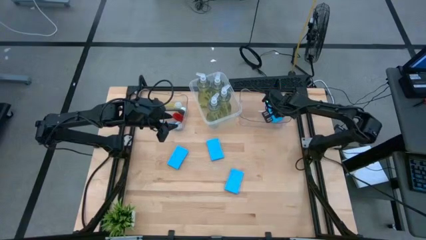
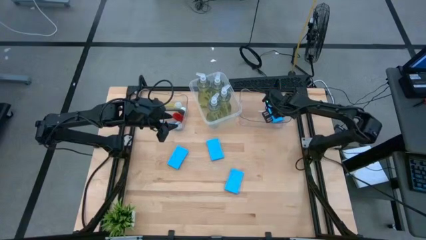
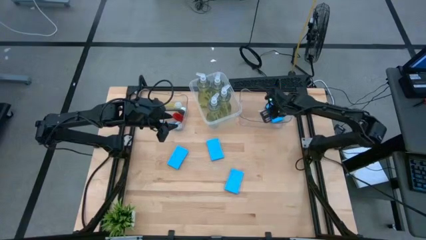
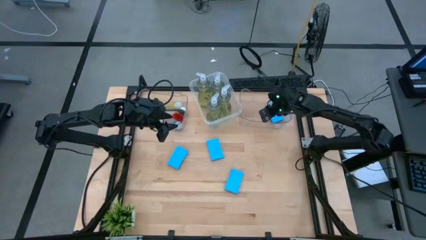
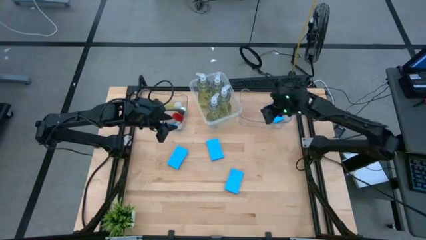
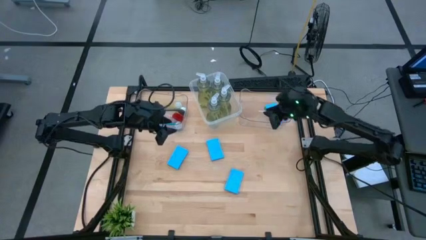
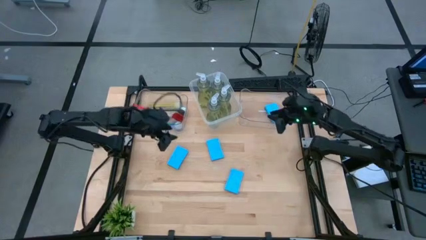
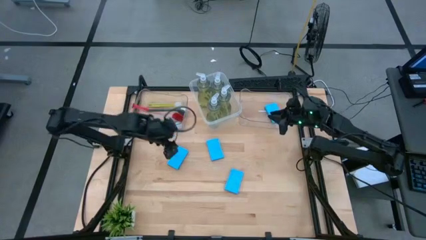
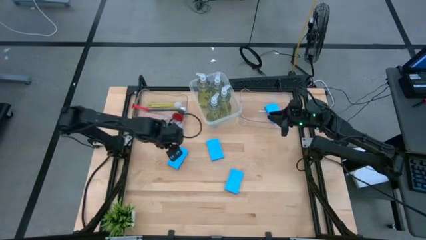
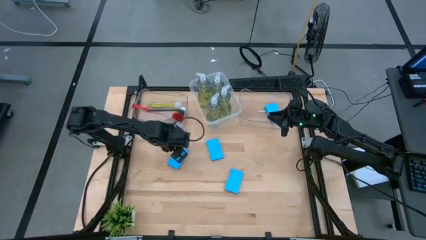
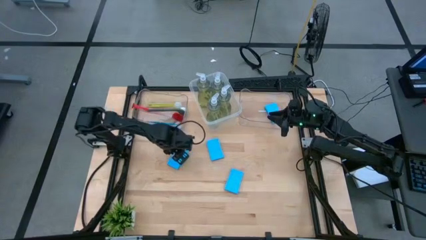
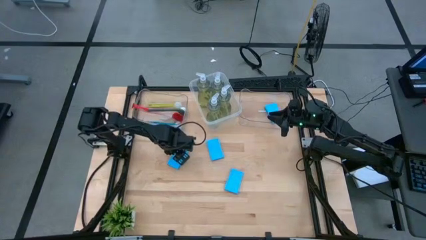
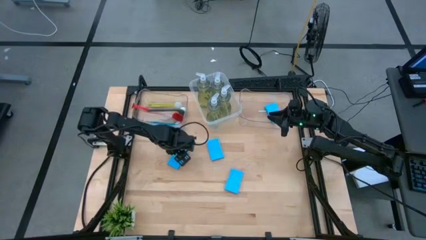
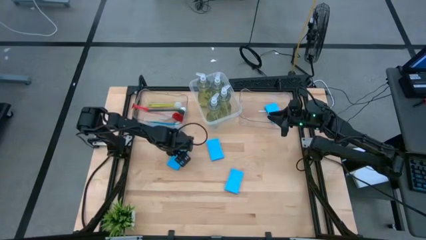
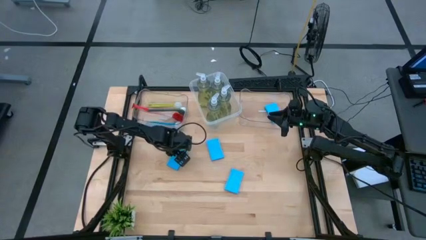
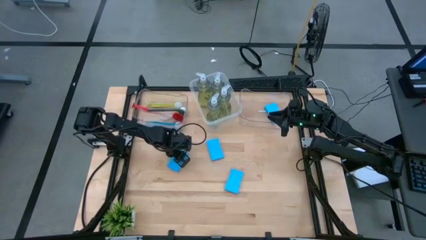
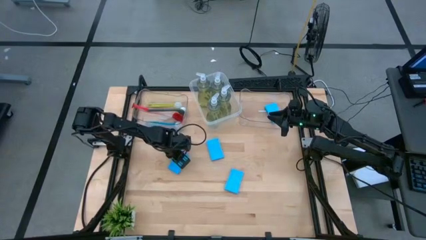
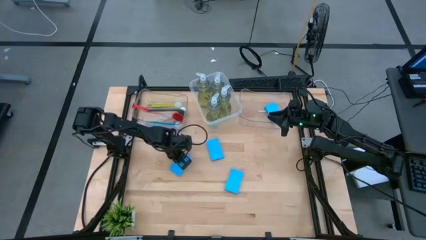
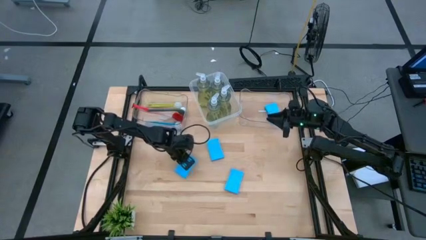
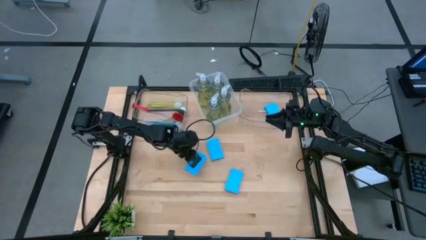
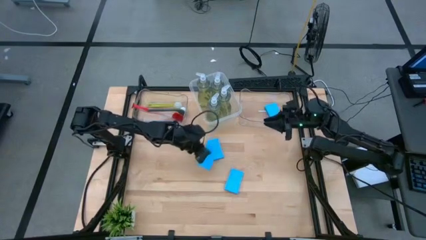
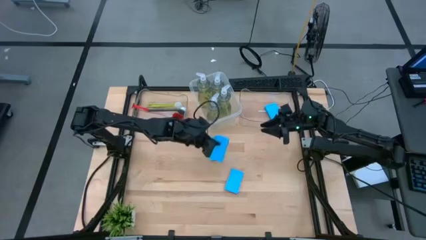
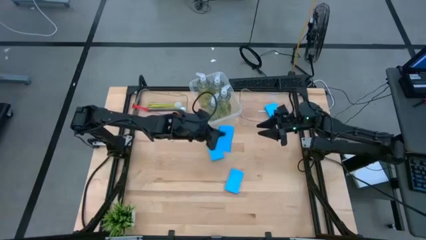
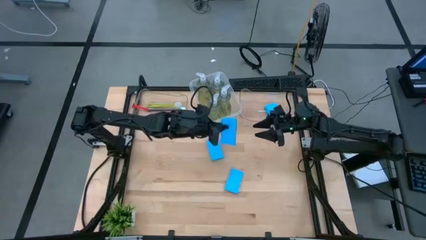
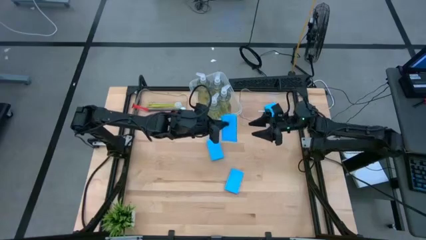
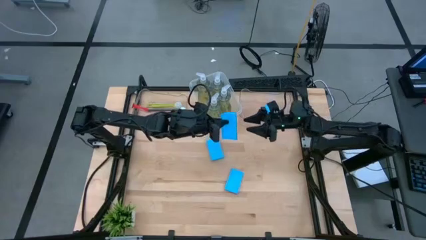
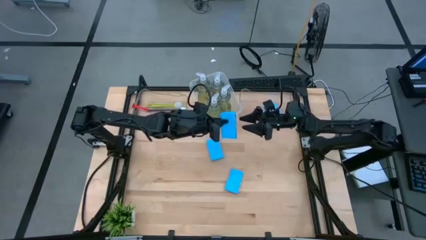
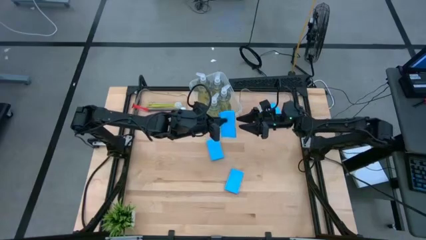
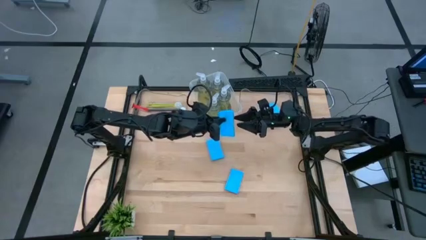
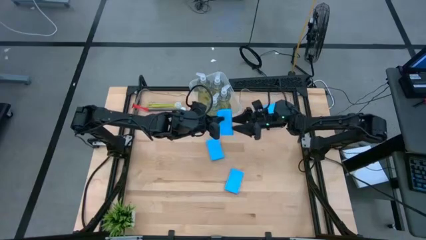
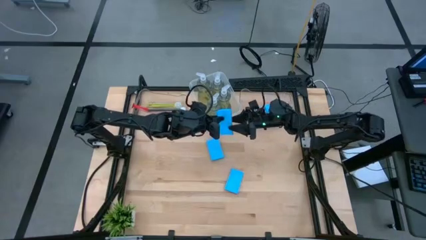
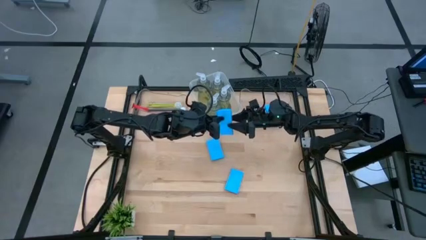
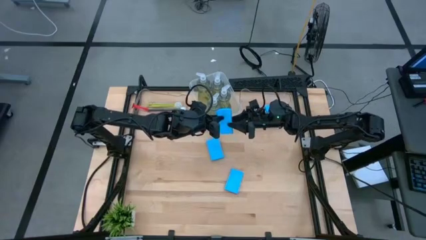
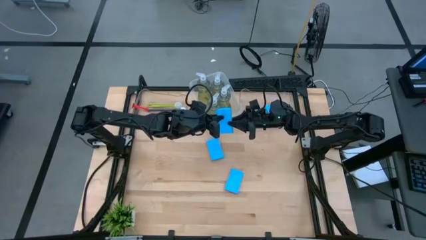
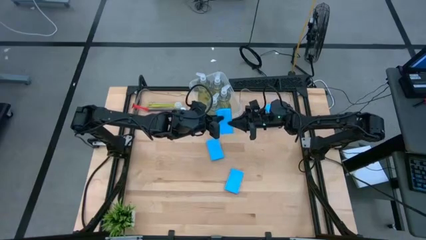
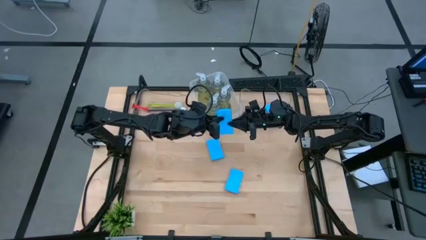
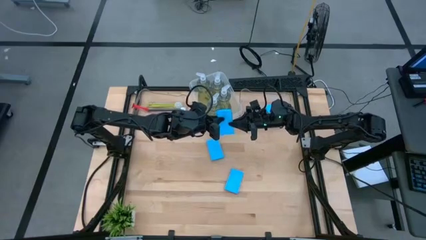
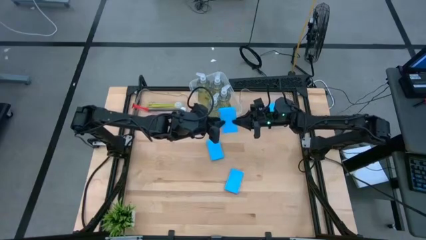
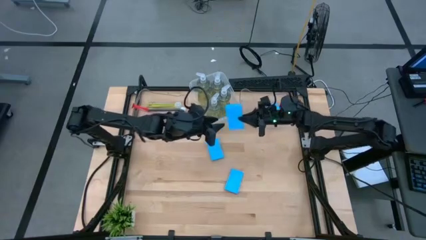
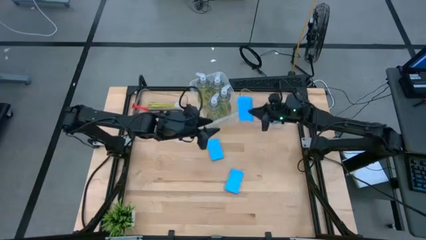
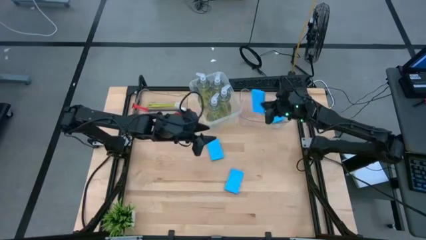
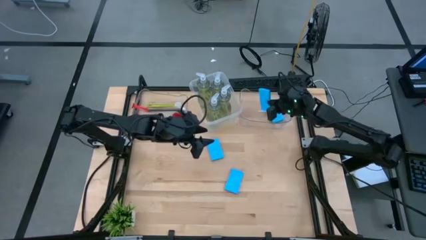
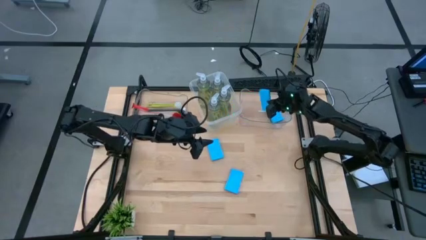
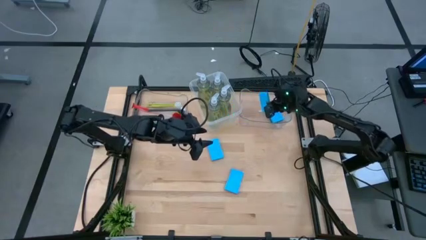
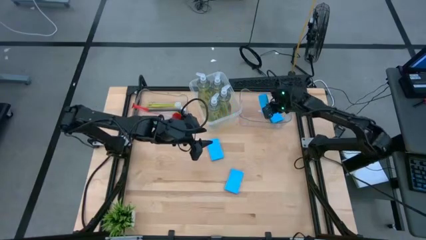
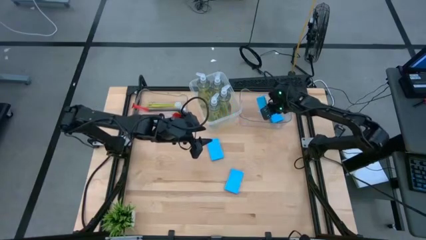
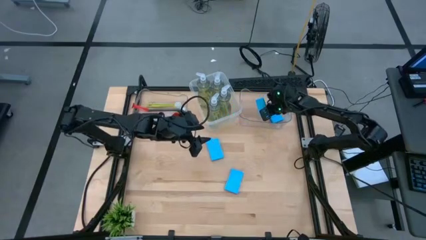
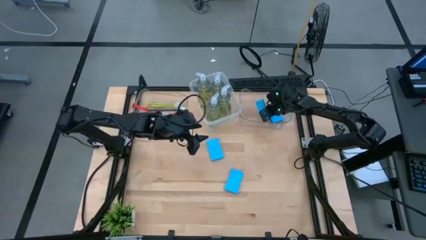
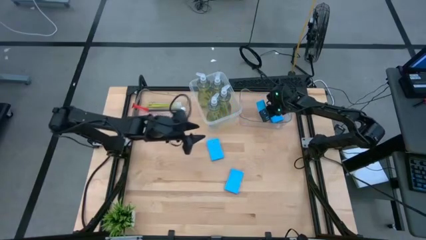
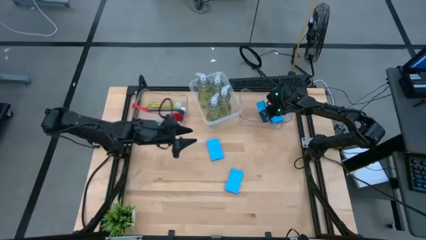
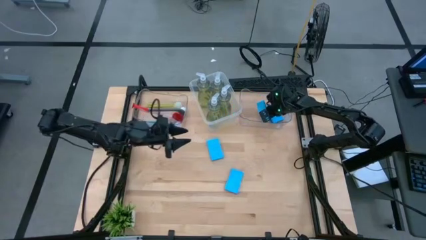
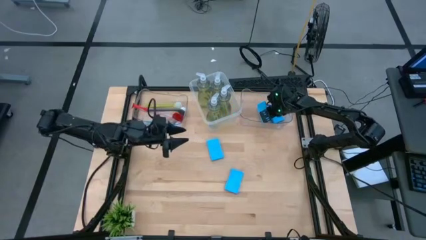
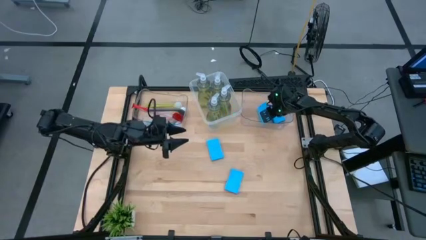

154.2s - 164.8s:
Task: Pick & Place Kitchen Sink Supplies
Put the blue sponge into the right transparent bin
